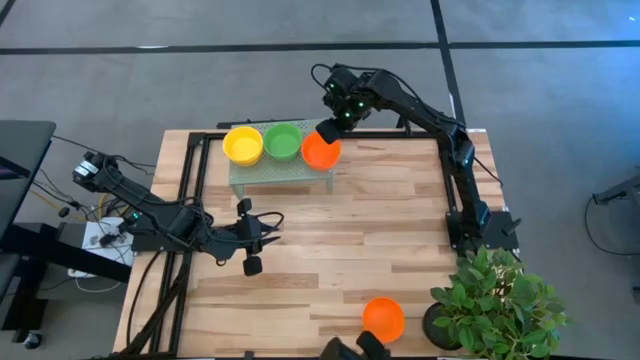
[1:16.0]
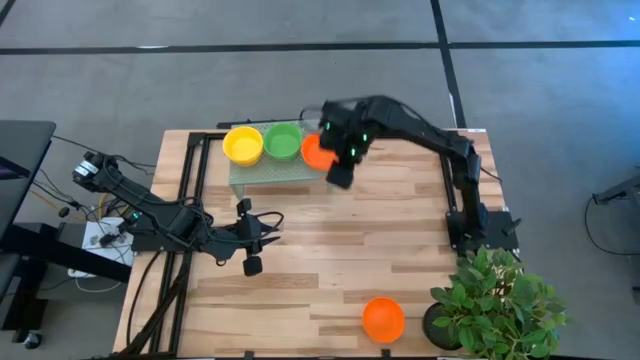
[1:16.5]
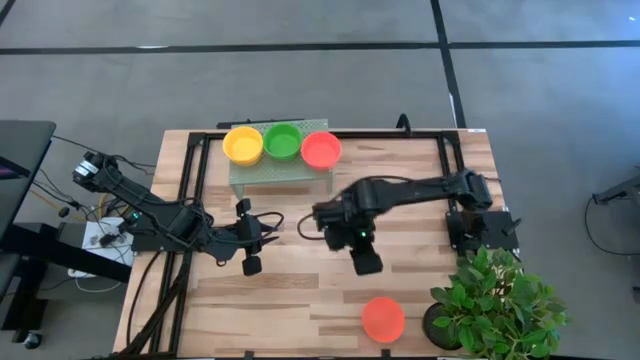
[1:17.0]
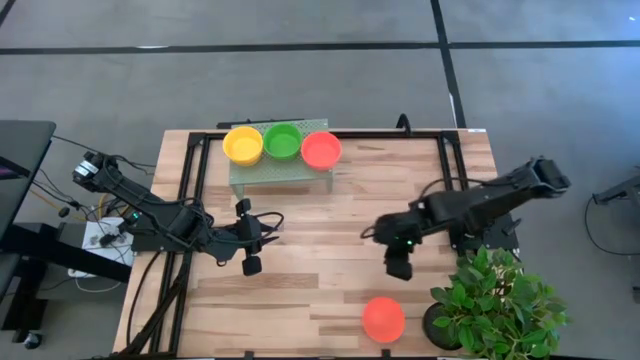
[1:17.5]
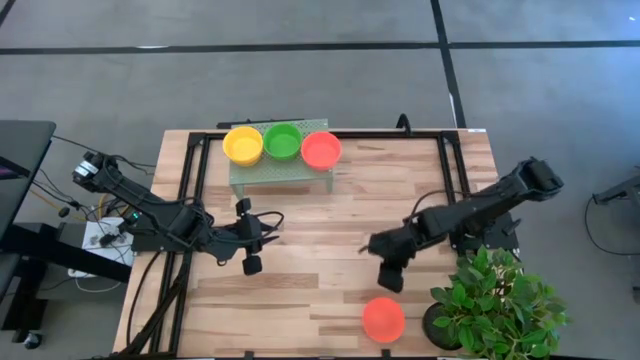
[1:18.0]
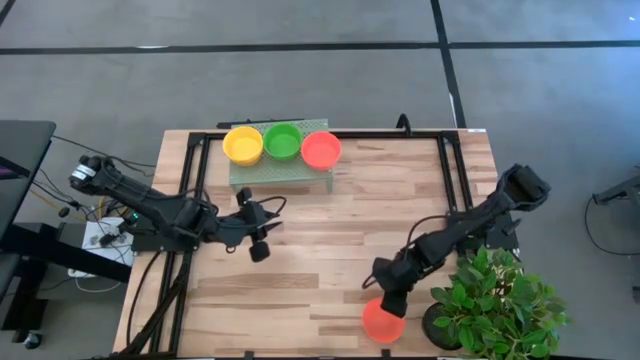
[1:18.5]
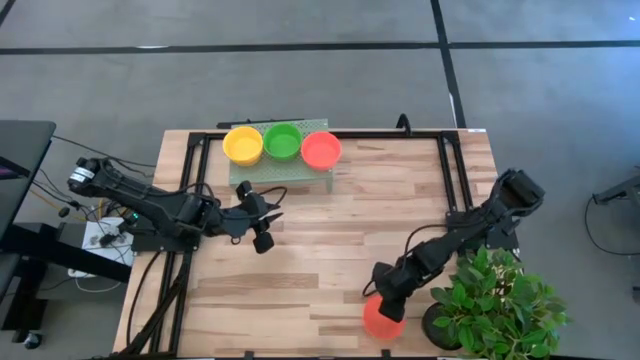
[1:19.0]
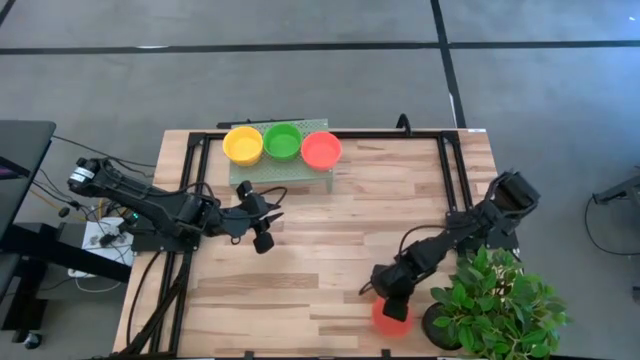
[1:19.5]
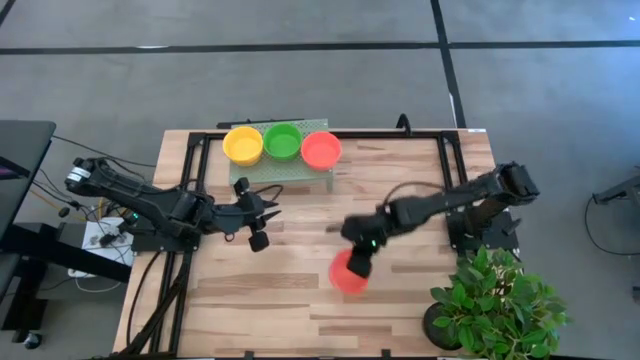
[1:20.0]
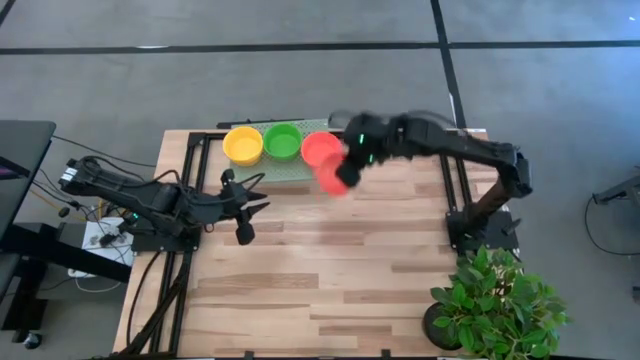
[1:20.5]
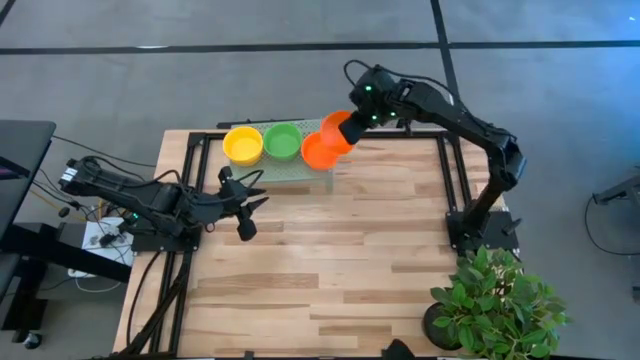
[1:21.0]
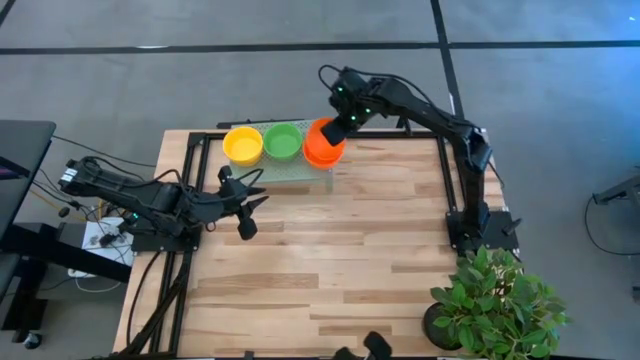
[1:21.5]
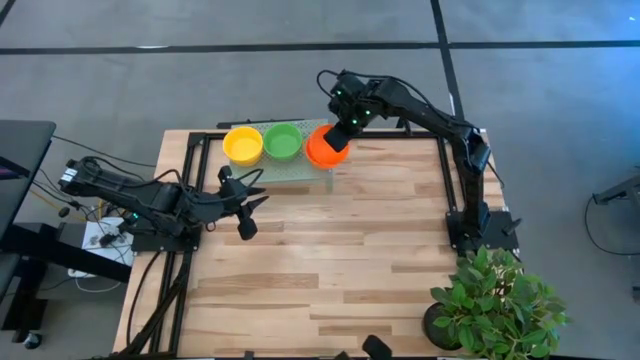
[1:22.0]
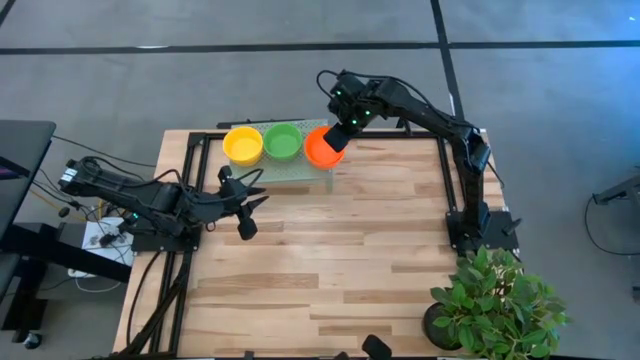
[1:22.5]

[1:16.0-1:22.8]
Task: Pick & Place Mini bowls
Stack the orange bowl on top of the other orange bowls on the shelf

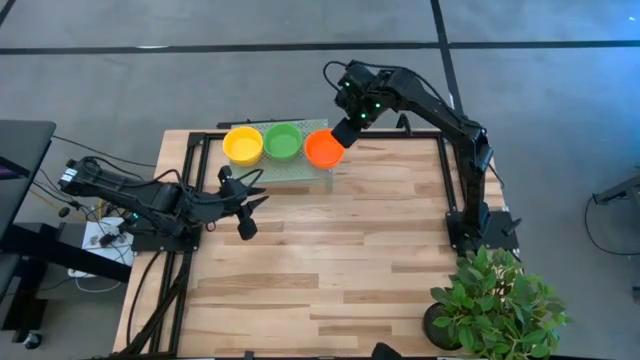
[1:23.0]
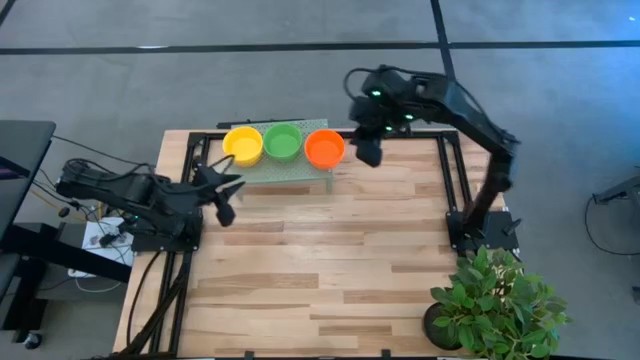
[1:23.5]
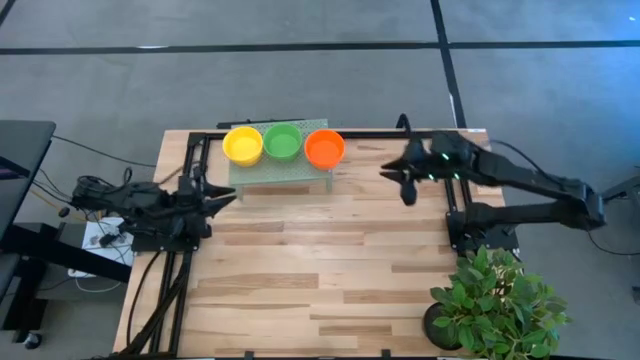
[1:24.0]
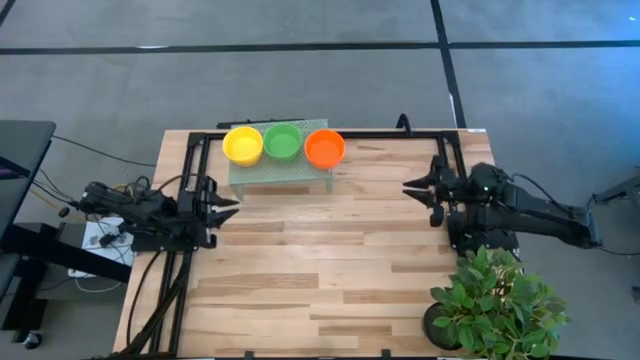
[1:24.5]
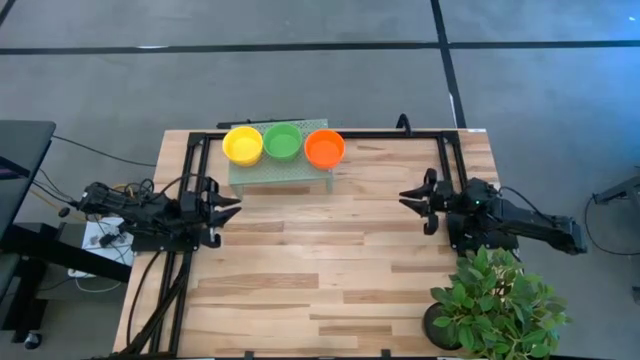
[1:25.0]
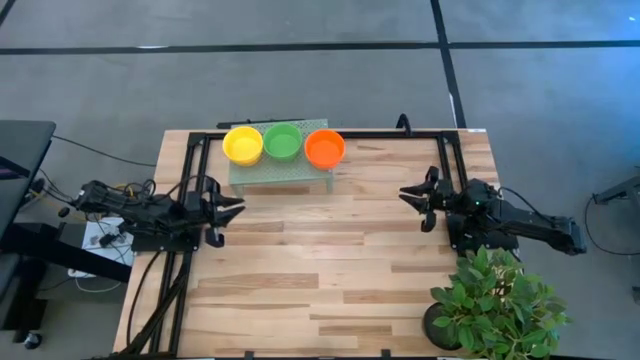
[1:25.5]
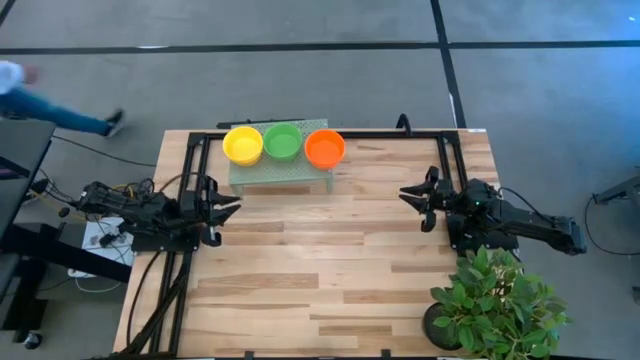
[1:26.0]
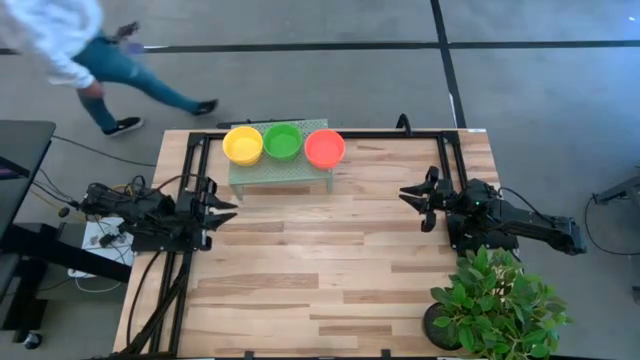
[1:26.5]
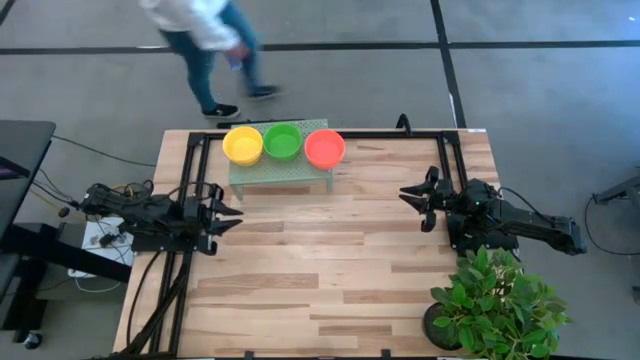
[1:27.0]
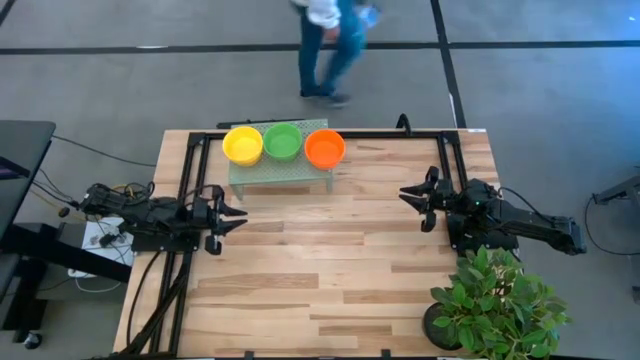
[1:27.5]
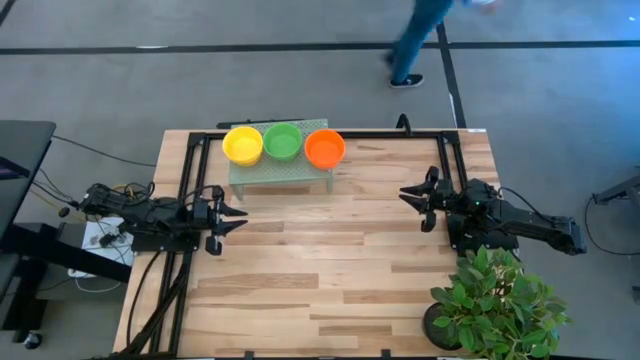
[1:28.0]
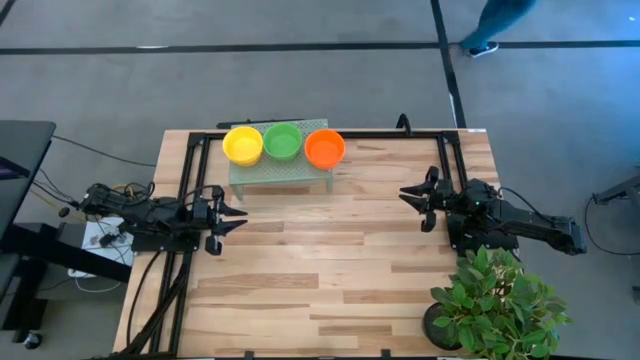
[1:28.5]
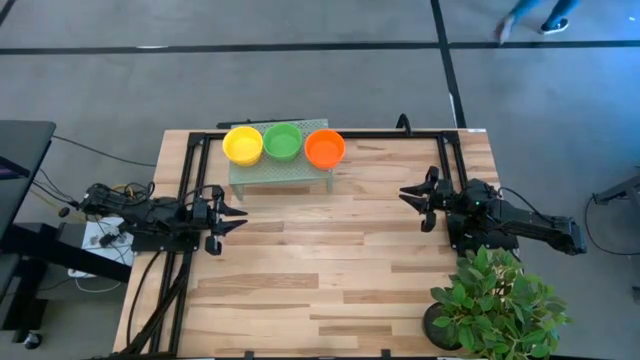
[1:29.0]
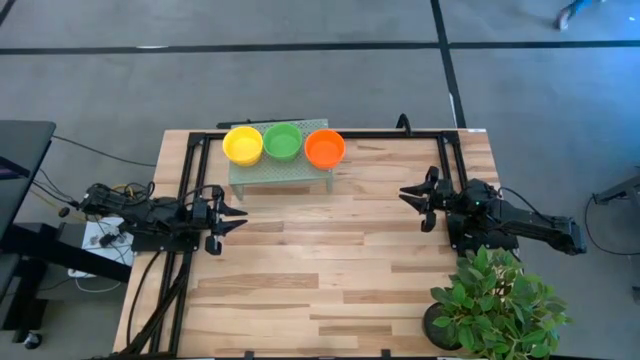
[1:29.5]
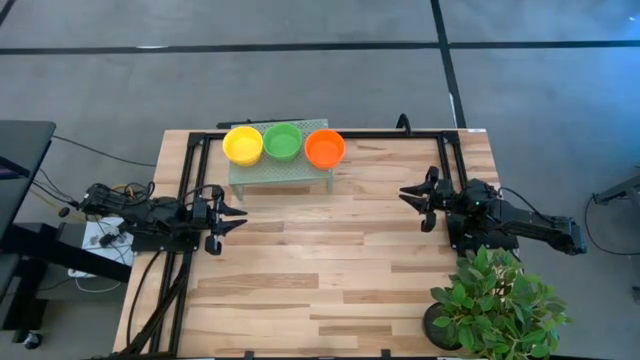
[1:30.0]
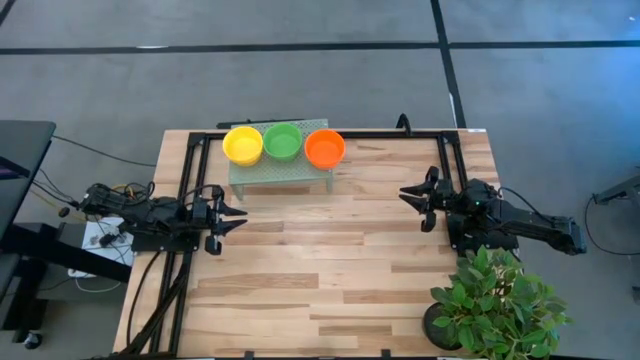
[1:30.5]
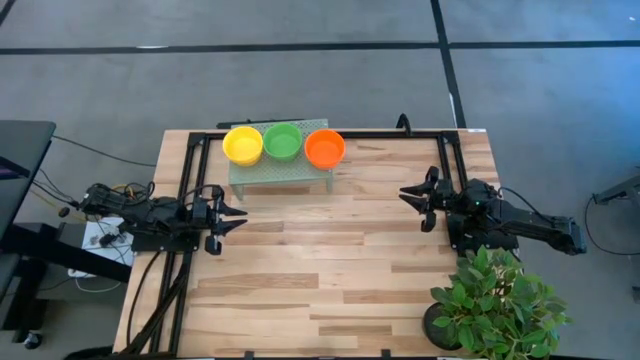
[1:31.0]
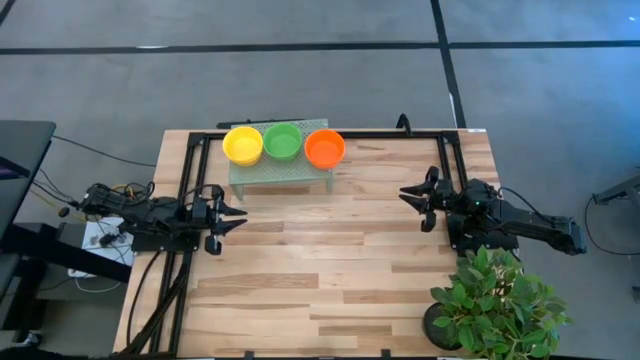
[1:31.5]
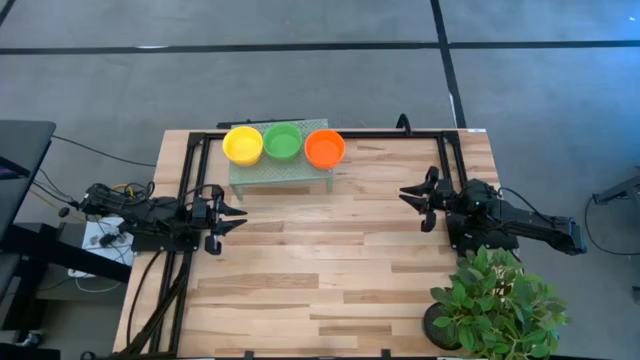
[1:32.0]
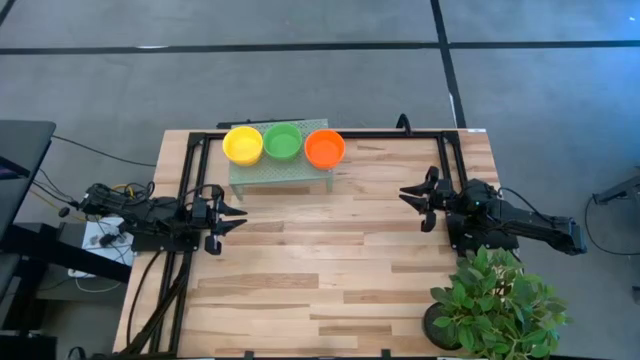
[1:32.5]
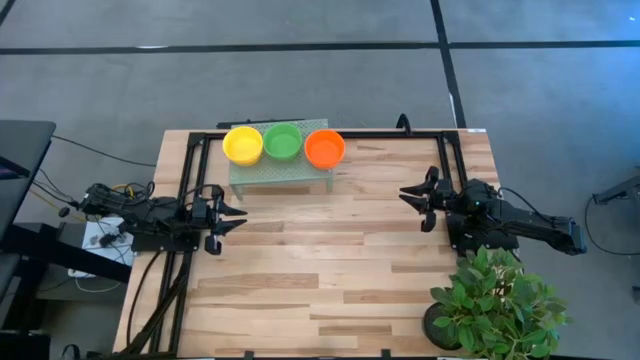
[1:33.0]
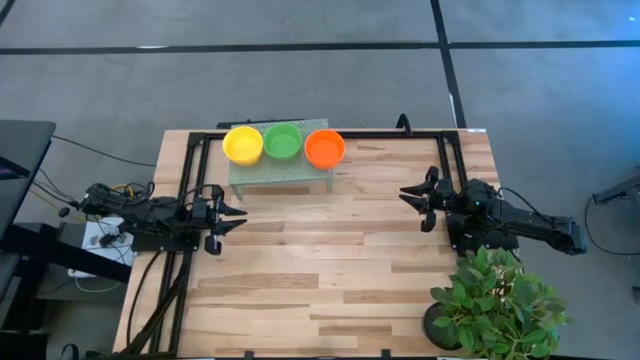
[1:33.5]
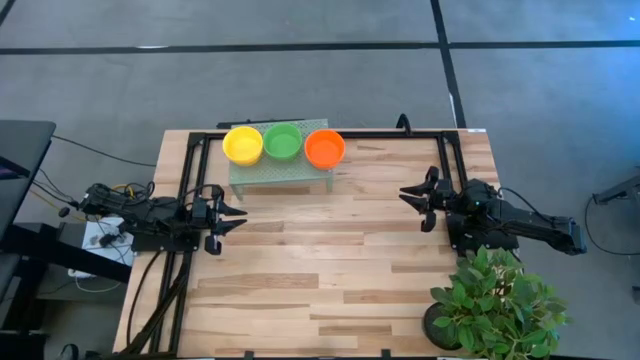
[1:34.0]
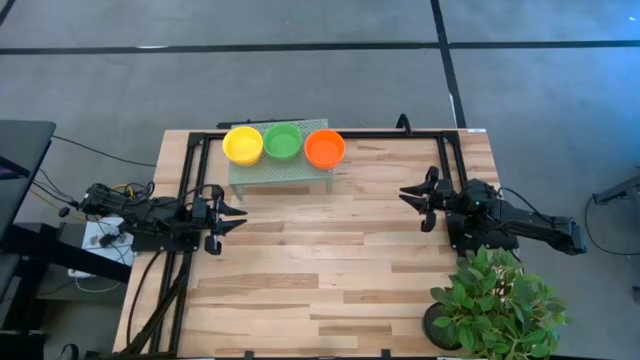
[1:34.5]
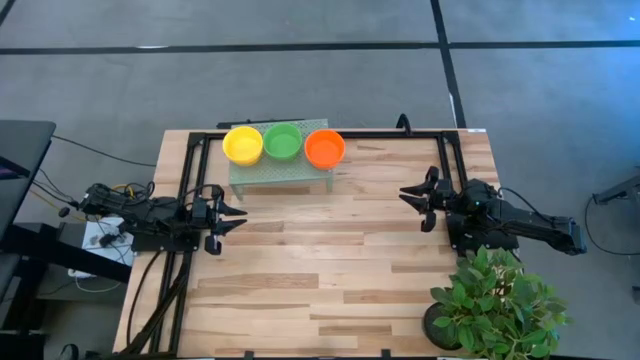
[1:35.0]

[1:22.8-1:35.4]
Return to Home Position

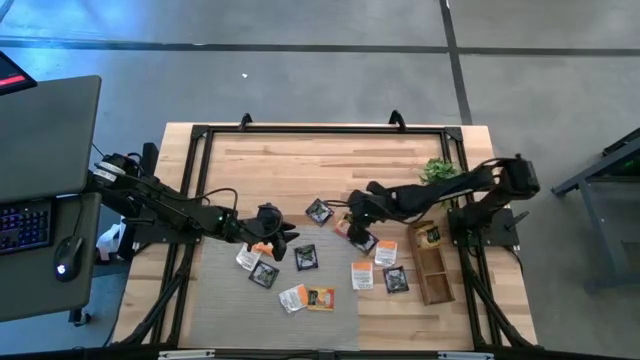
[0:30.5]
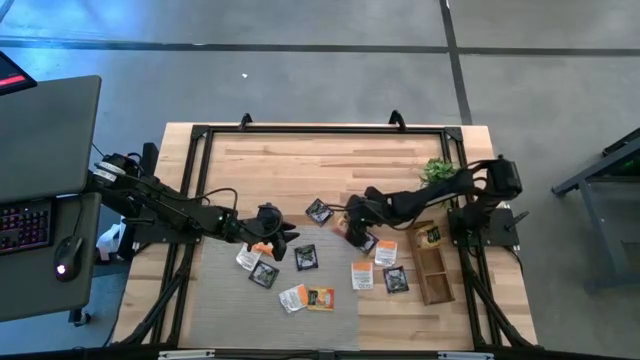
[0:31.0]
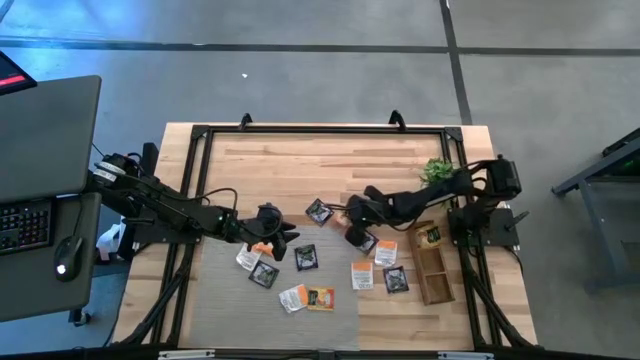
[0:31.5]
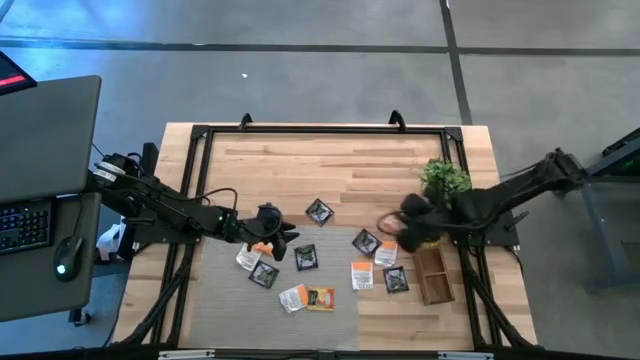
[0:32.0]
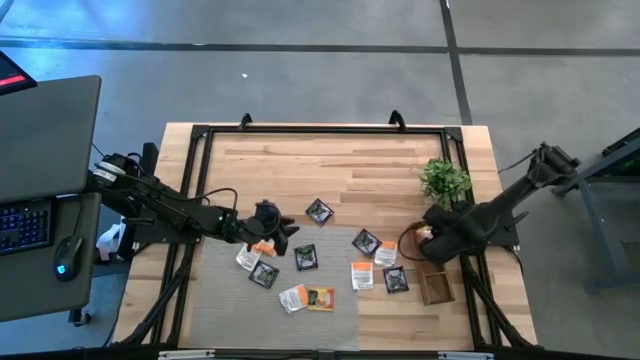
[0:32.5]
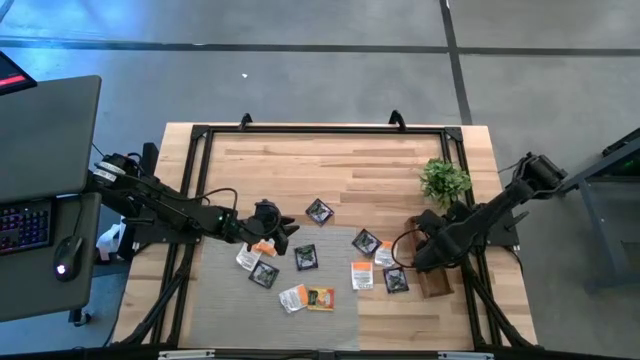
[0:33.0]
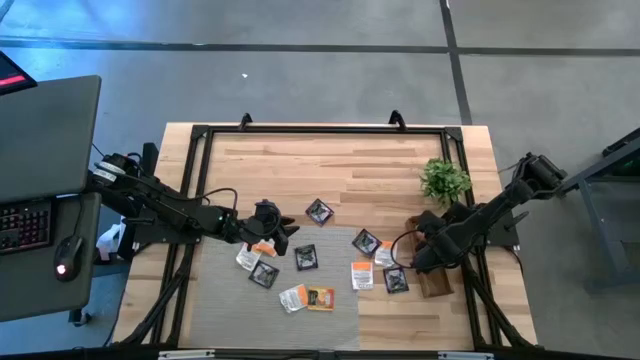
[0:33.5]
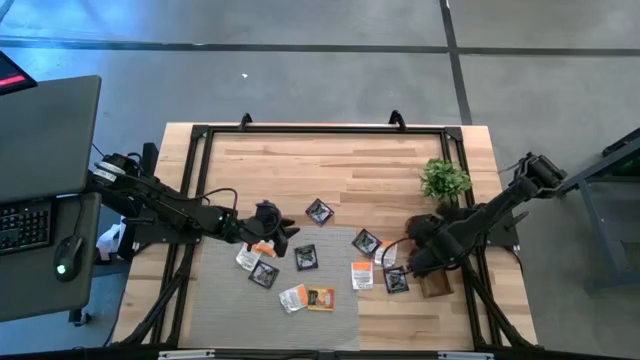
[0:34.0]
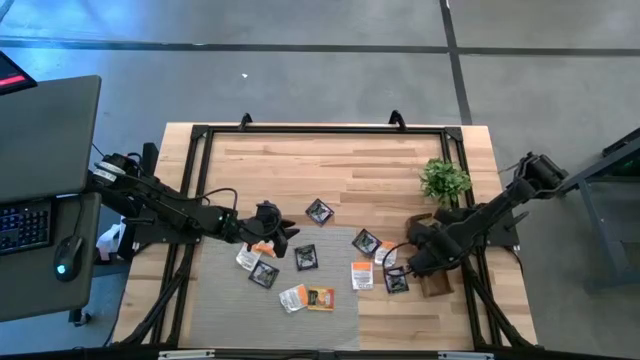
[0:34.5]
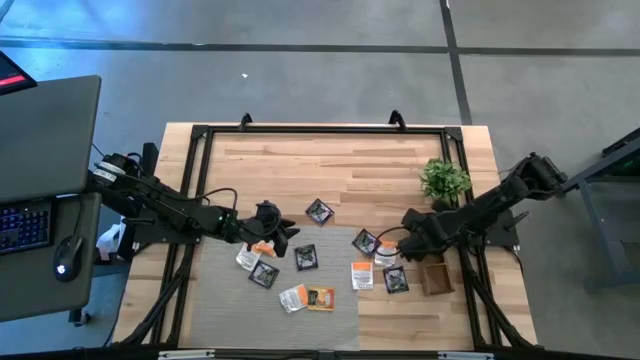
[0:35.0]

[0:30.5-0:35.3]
Task: Pick & Place Tea
Put the orange tea bag into the top section of the wooden organizer
